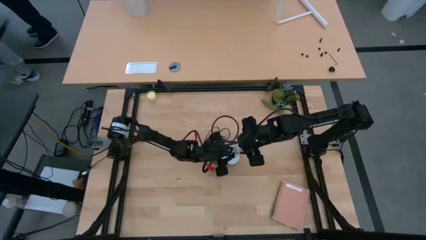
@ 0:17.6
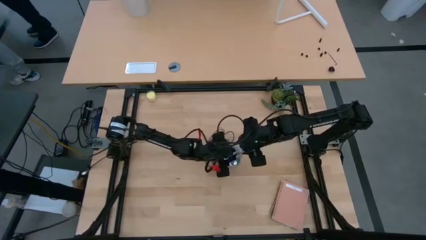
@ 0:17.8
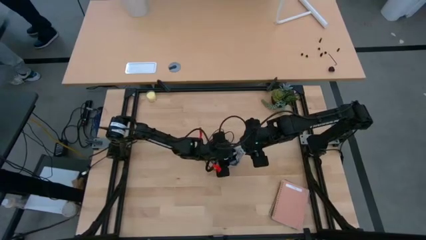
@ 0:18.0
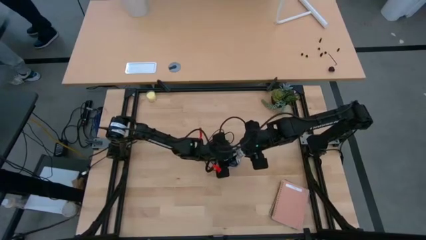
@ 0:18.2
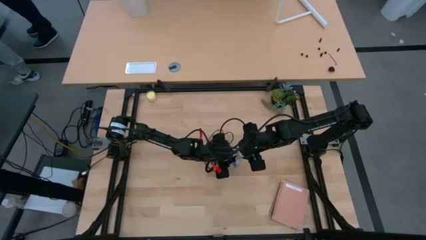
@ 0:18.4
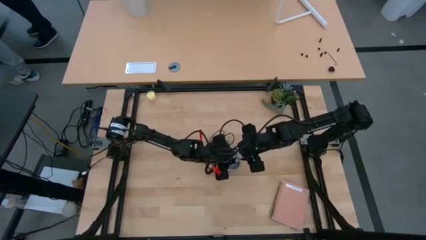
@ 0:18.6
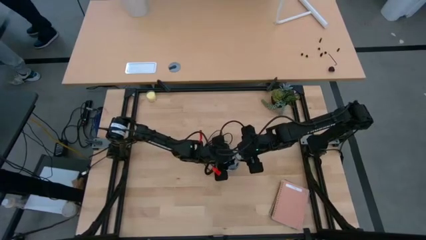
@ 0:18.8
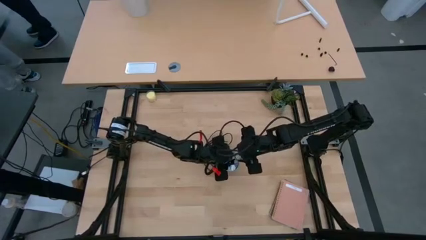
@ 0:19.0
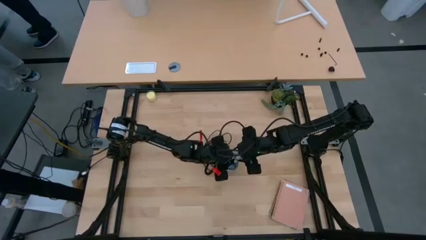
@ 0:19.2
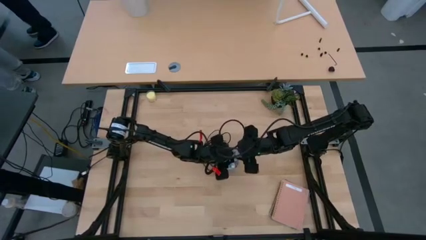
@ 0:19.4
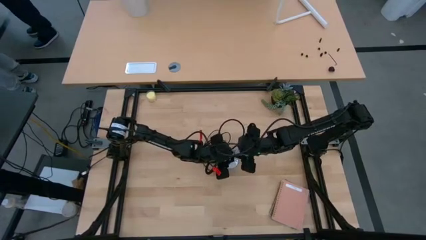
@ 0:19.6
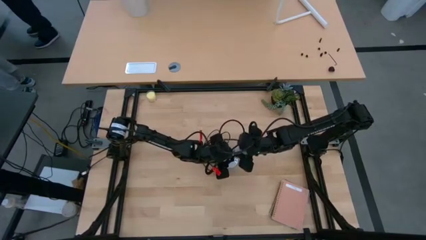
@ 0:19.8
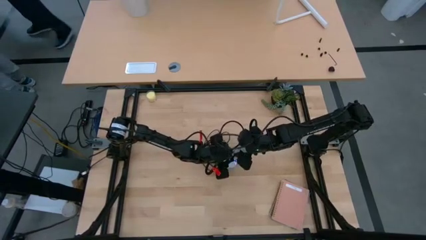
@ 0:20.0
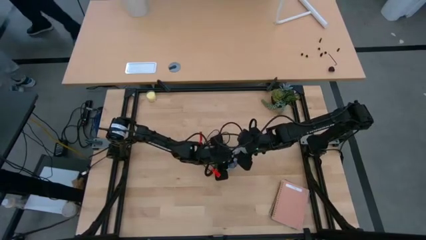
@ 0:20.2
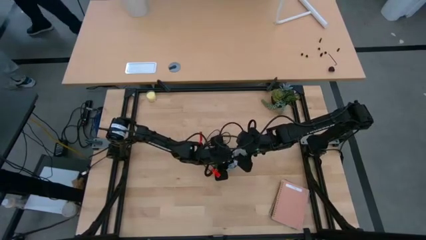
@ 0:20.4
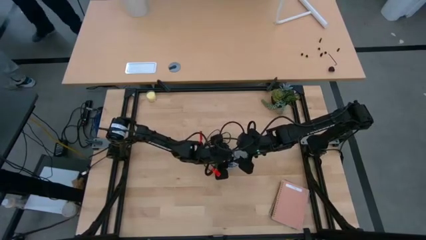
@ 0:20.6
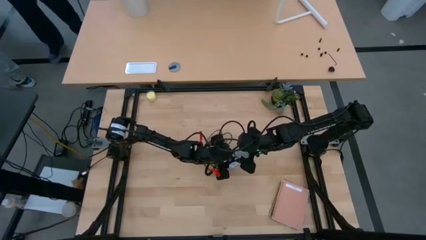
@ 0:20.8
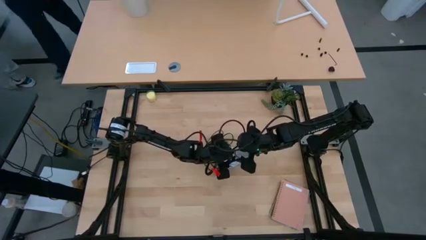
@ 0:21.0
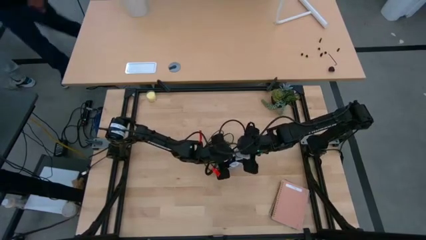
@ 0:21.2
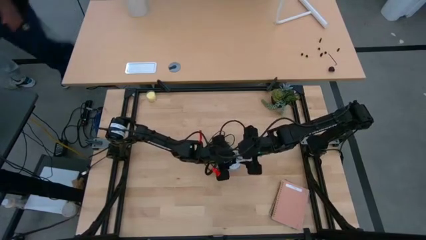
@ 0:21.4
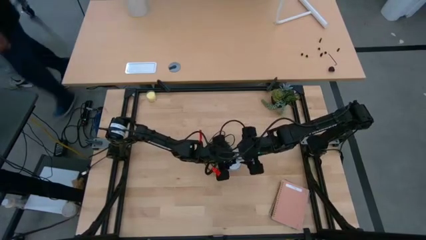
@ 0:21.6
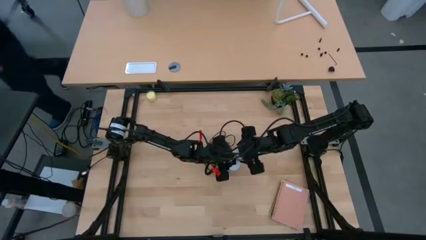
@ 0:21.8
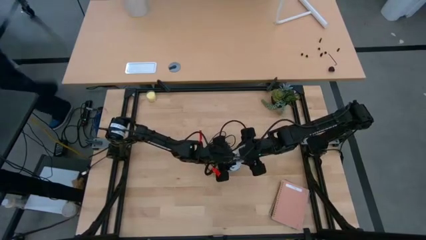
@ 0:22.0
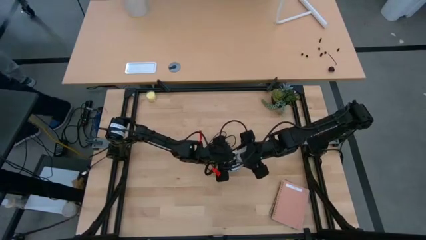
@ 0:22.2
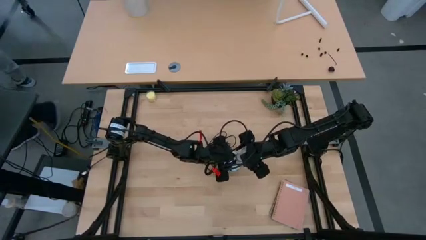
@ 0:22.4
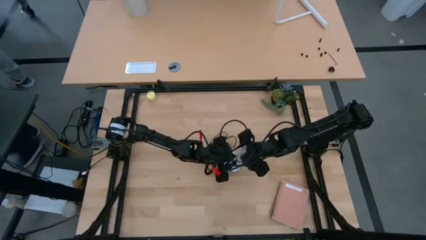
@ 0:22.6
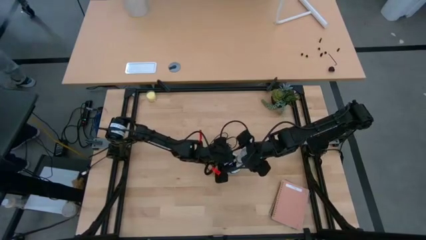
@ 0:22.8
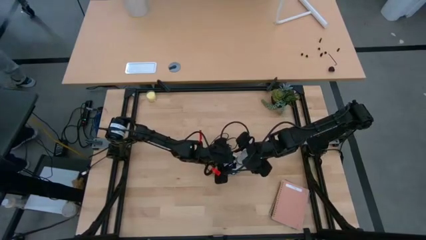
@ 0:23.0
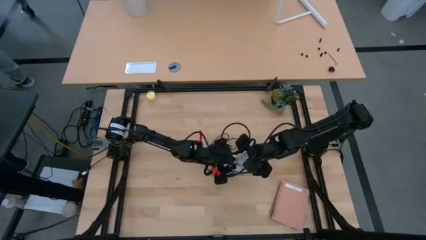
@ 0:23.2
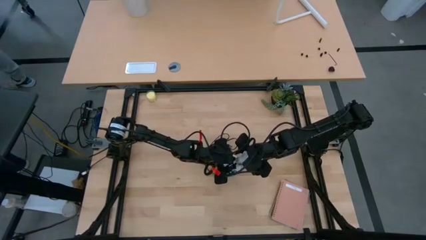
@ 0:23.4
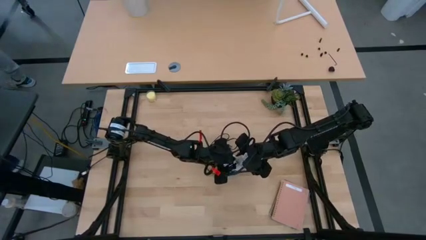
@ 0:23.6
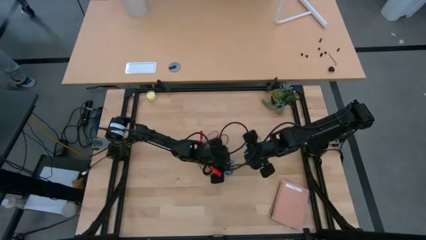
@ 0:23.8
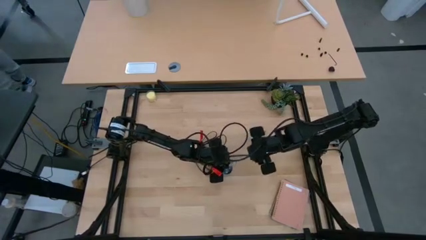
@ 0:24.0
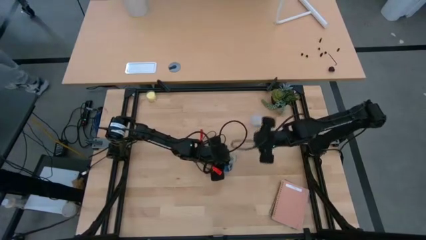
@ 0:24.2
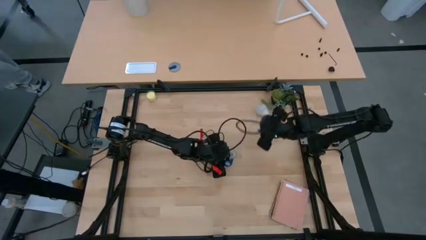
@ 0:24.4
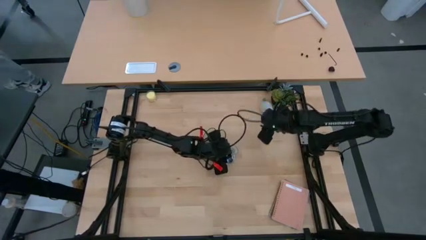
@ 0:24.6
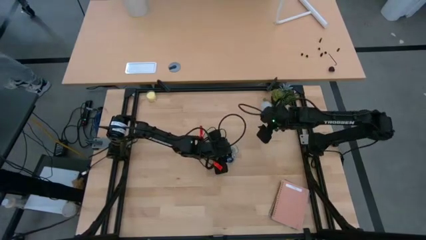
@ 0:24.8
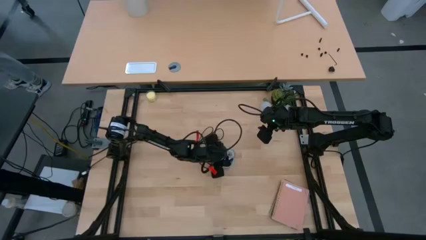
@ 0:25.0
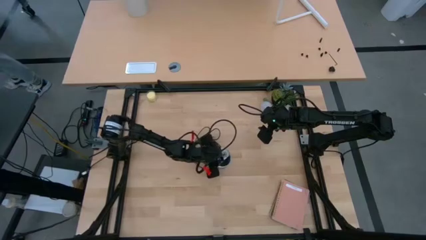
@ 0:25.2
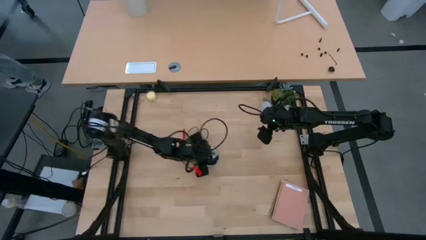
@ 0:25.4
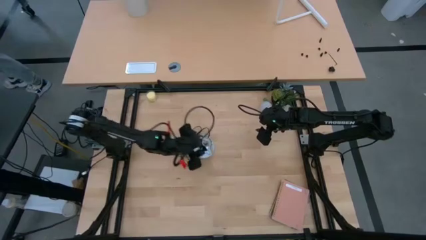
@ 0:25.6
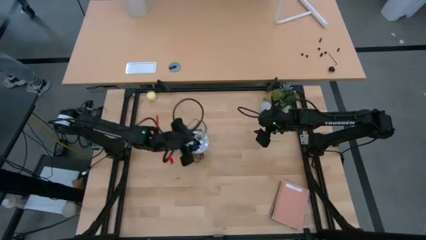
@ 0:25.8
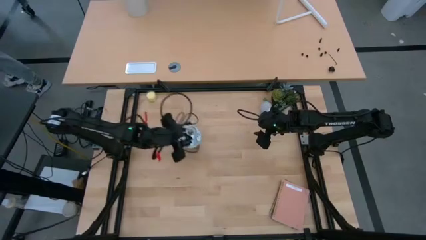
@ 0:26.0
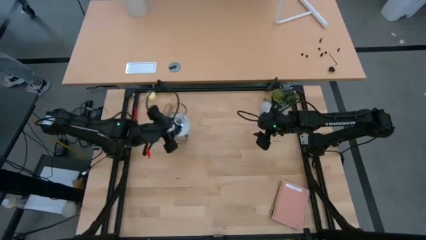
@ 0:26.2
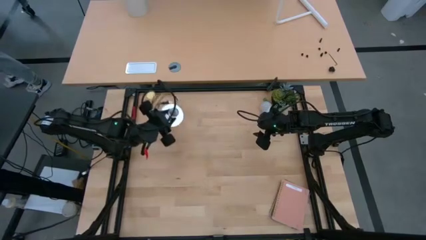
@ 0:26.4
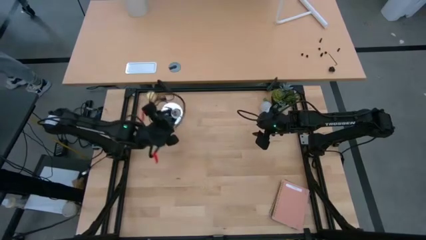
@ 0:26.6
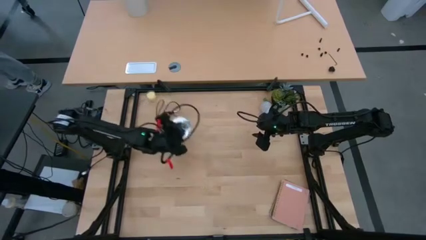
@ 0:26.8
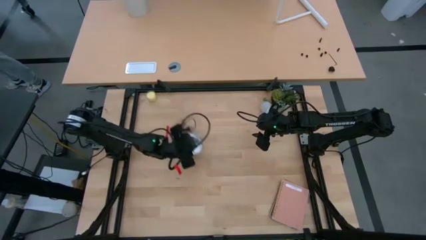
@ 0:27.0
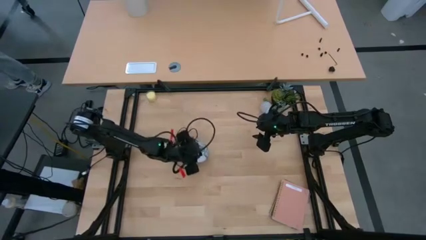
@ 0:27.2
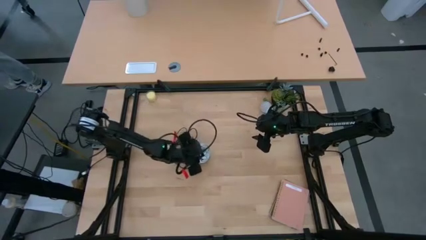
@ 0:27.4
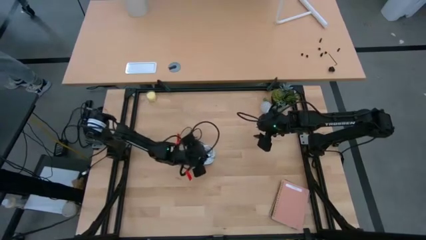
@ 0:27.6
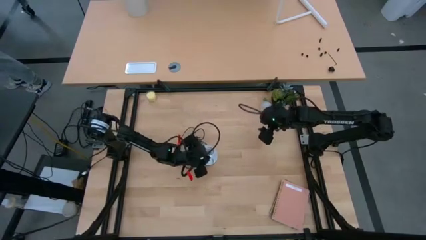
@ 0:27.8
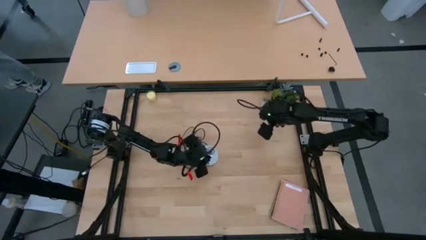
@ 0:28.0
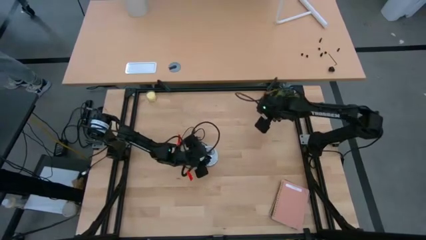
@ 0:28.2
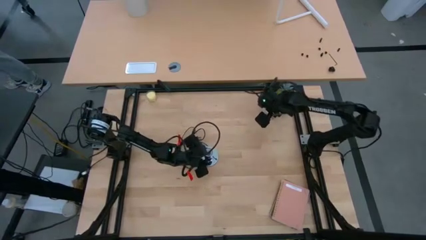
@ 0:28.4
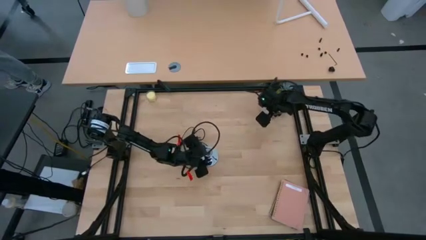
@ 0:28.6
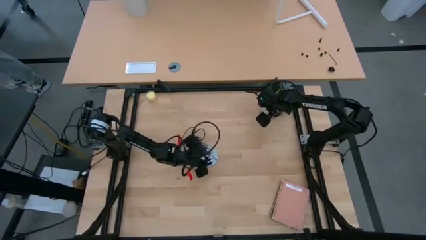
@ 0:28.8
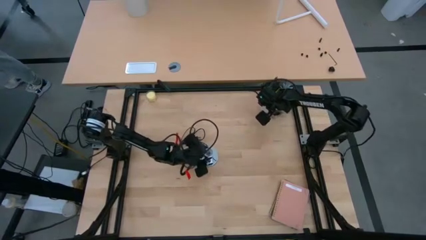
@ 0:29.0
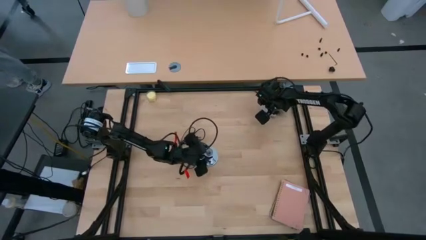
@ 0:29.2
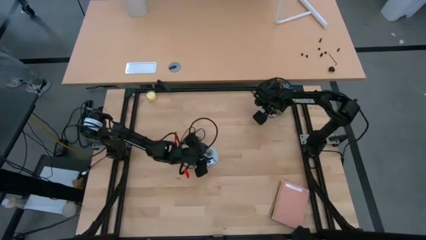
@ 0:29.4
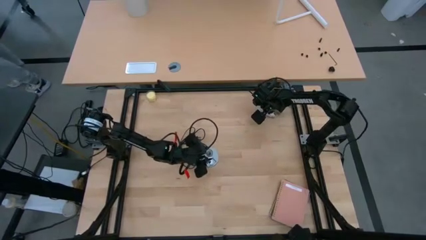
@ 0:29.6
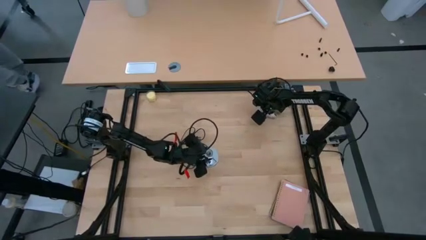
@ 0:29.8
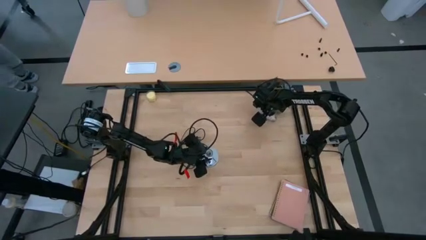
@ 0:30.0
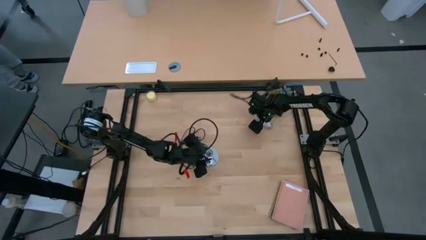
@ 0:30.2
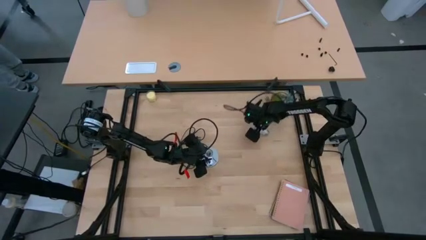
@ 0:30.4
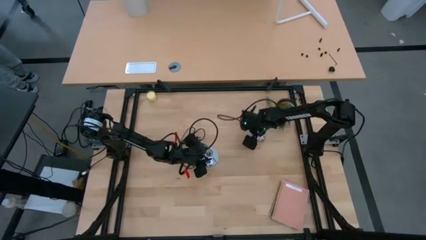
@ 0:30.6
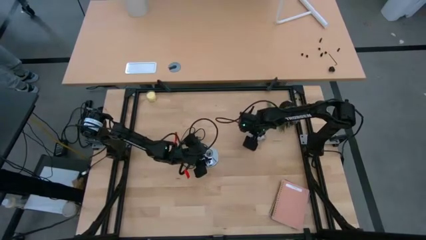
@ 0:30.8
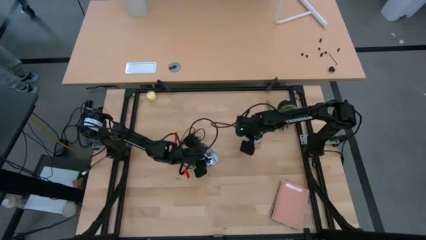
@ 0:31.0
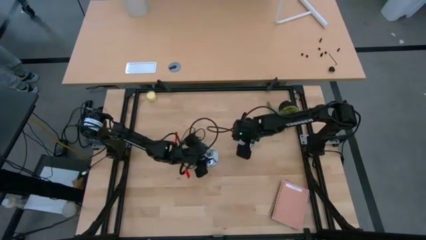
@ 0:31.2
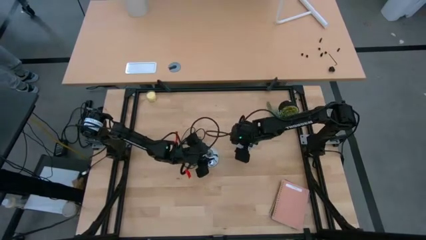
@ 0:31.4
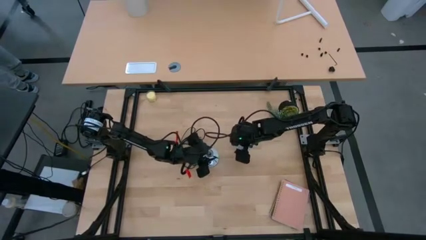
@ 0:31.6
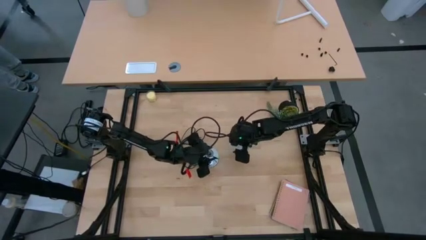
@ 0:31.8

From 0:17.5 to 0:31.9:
Task: Screw lightbulb
Insert the light bulb into the lamp
